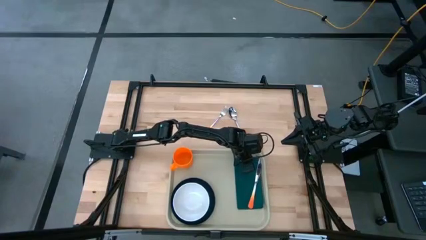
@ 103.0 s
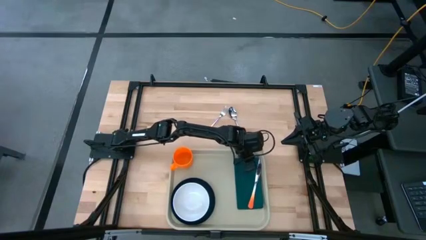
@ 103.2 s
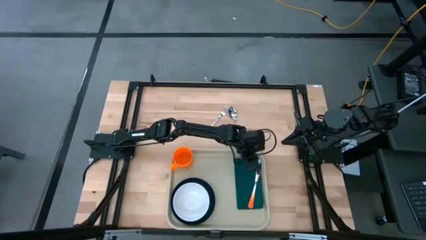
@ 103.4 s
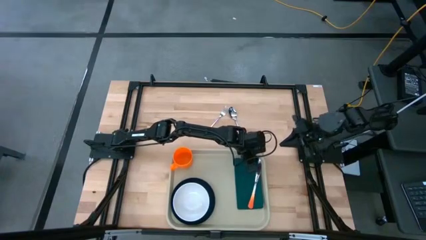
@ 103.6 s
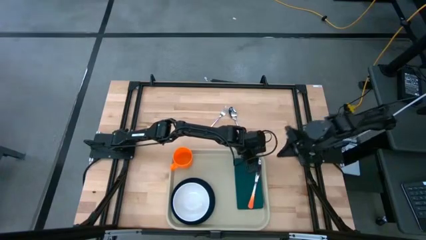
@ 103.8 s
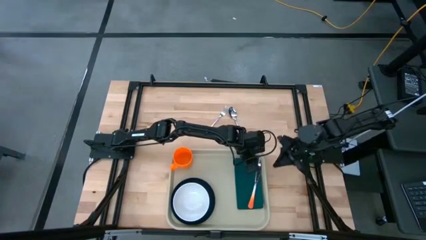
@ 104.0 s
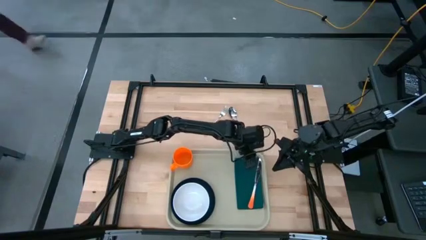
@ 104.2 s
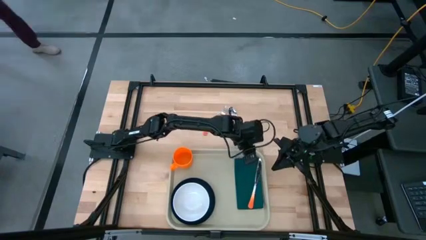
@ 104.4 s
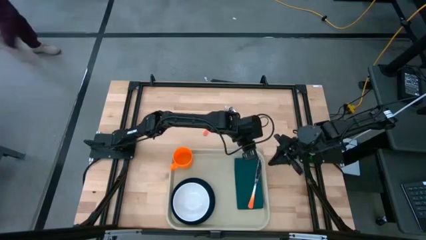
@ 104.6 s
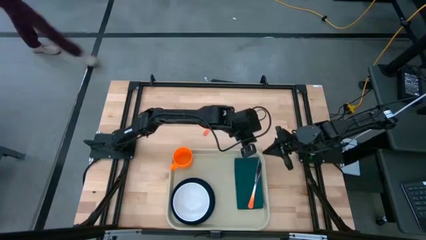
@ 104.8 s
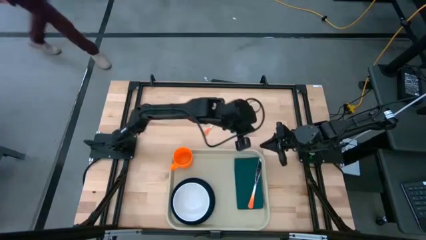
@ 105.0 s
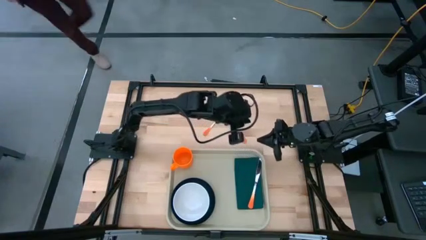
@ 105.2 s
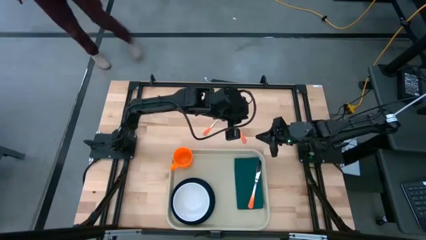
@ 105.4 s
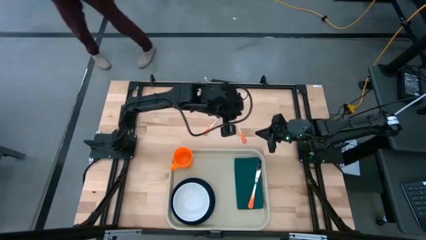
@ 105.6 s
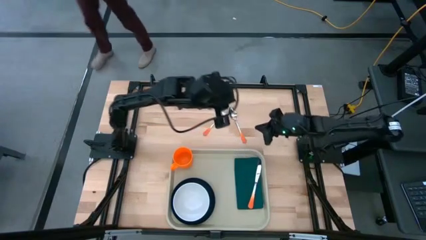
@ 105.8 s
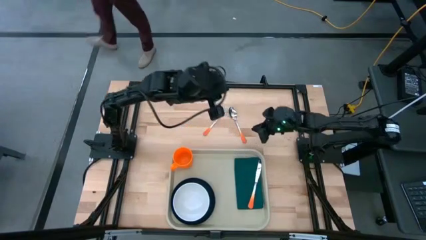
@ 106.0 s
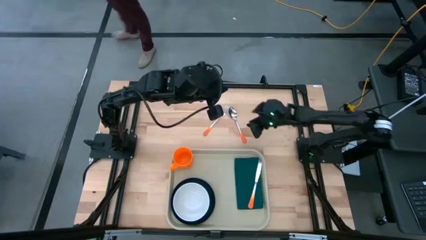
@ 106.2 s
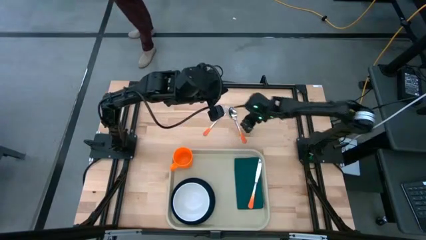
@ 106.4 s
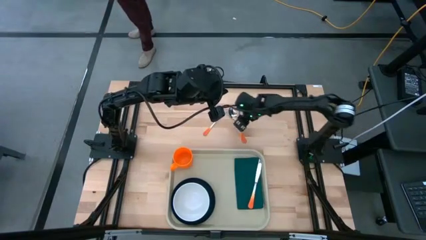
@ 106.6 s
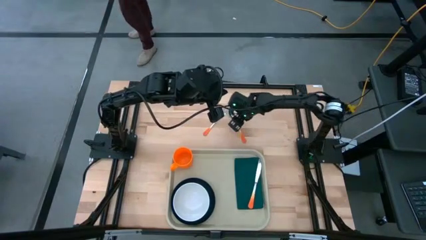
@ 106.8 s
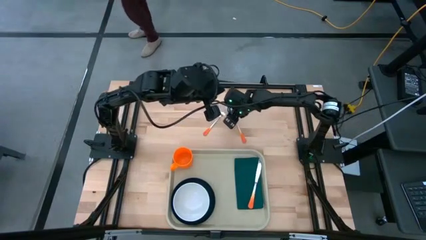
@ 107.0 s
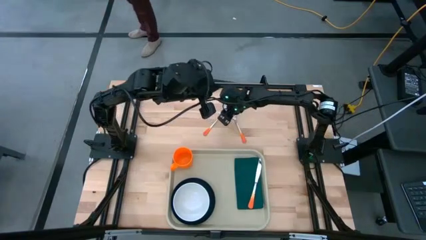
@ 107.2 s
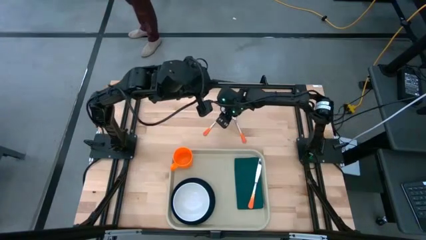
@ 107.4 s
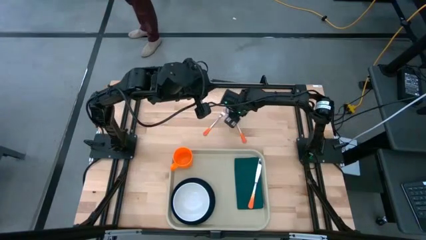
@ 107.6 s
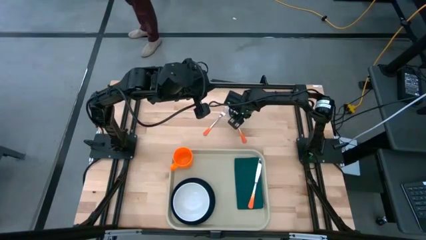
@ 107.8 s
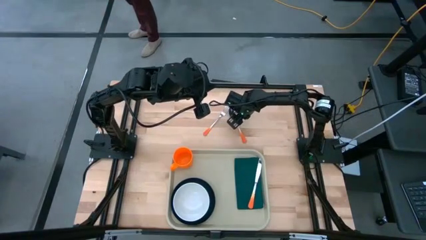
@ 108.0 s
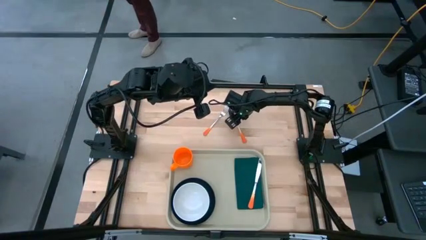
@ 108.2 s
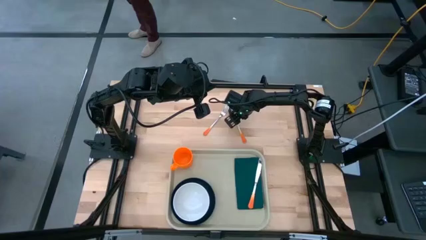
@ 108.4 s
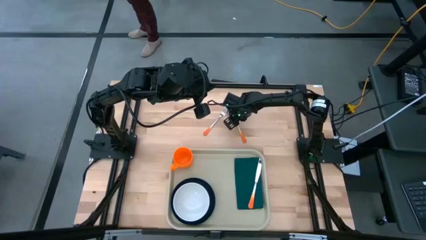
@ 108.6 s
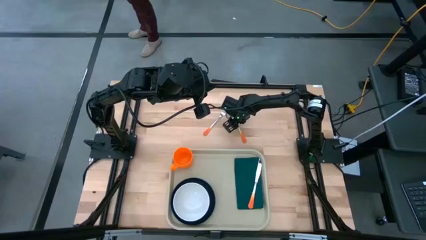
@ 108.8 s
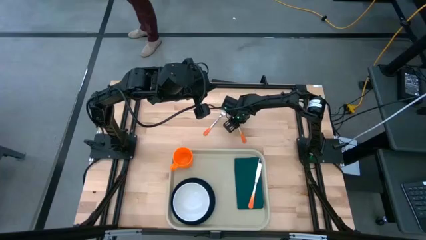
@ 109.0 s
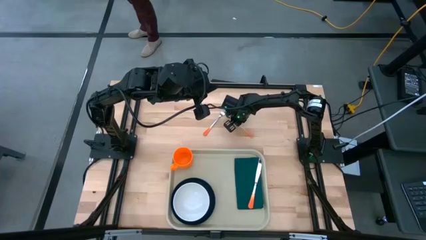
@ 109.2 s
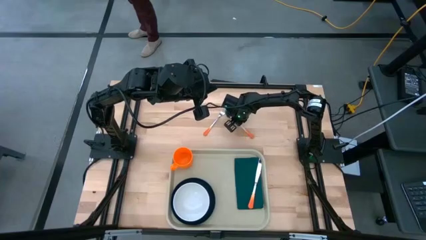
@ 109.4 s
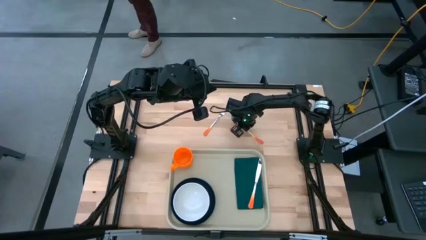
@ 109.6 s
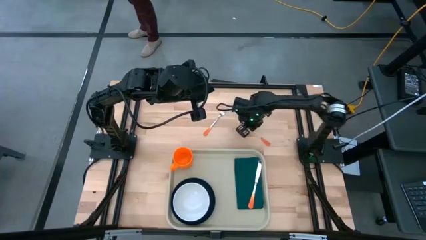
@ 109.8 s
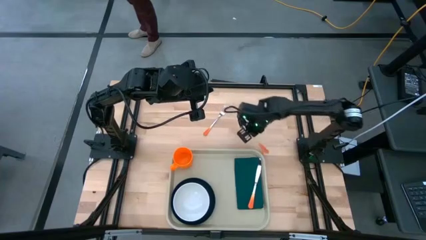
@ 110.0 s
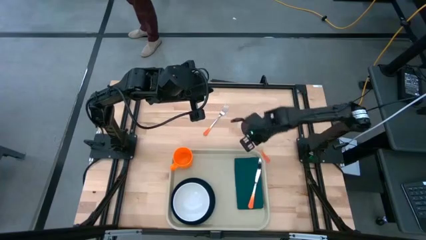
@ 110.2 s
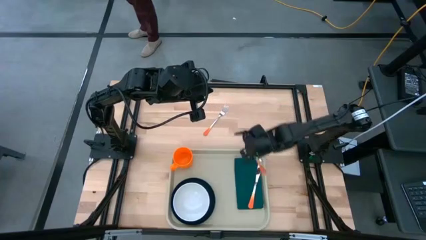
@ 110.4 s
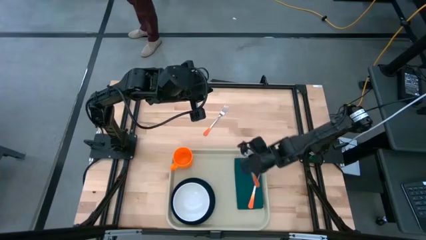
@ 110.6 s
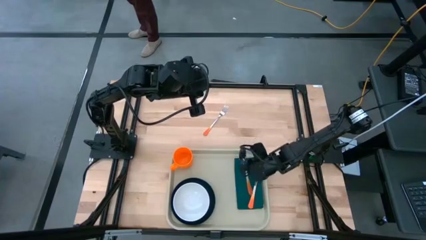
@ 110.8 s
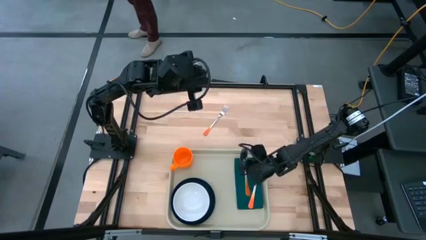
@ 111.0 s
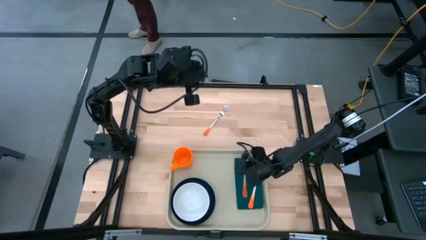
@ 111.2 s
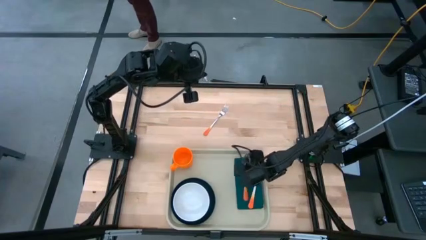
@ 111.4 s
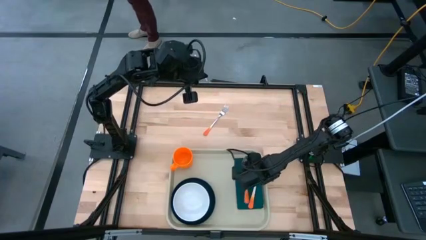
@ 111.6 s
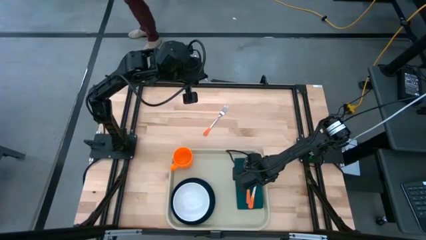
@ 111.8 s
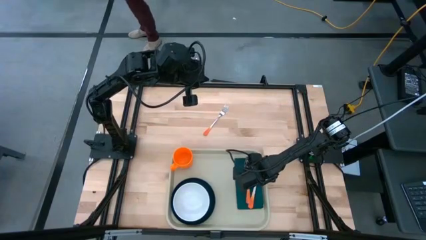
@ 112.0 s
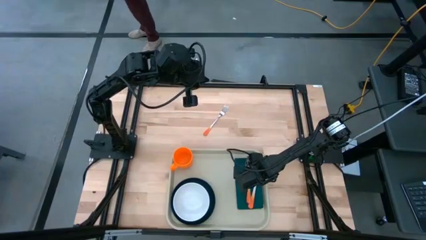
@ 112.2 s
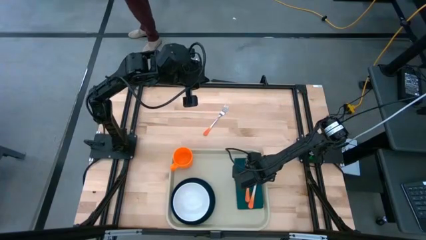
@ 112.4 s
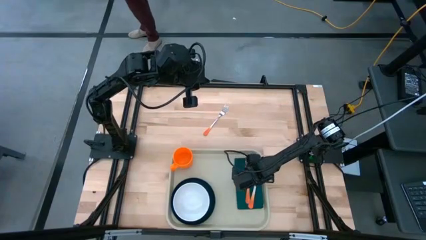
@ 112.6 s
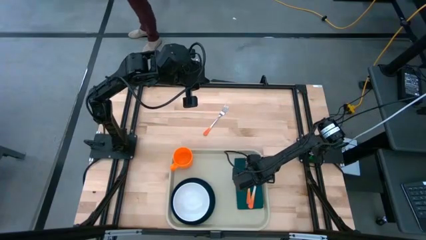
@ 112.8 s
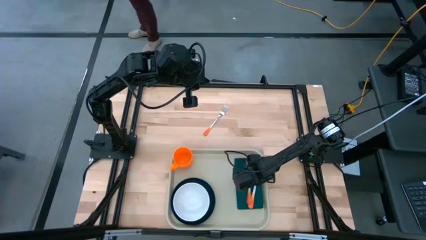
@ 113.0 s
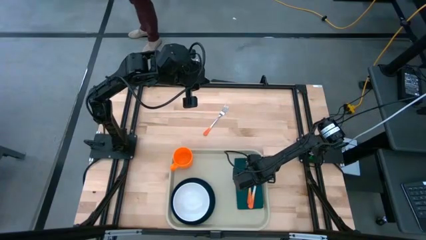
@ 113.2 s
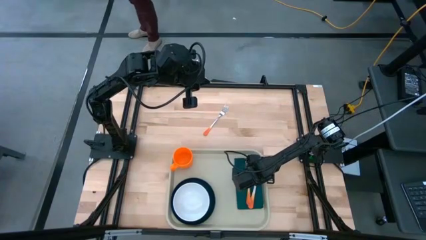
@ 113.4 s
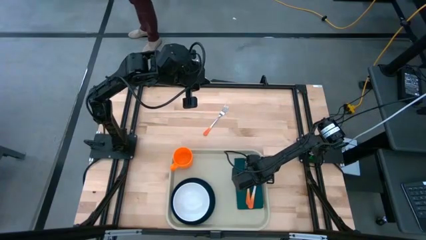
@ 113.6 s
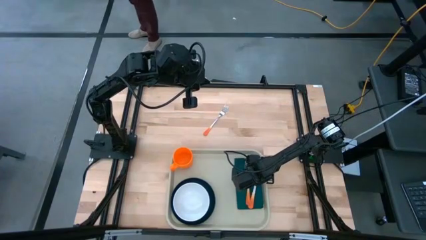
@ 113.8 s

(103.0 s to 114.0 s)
Task: Set up tray
Put the orange spoon on top of the green napkin to the left of the orange knife

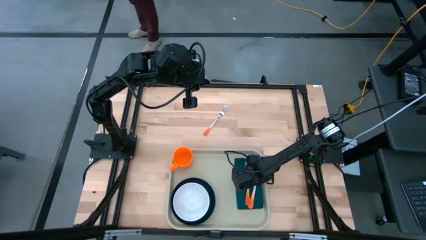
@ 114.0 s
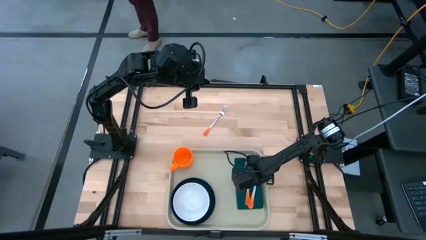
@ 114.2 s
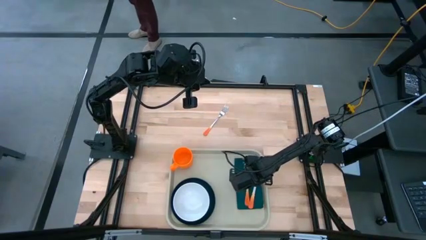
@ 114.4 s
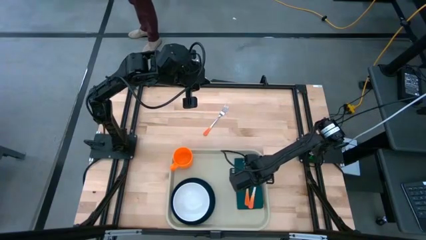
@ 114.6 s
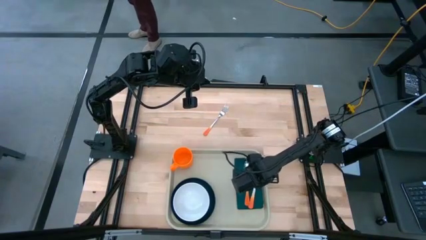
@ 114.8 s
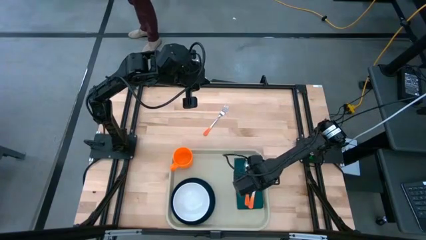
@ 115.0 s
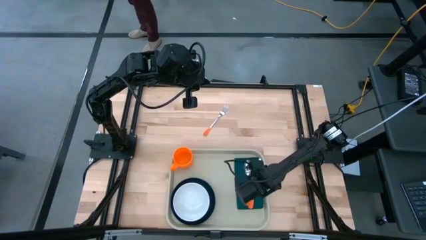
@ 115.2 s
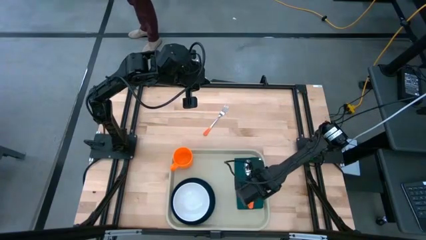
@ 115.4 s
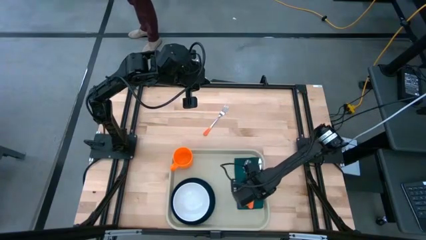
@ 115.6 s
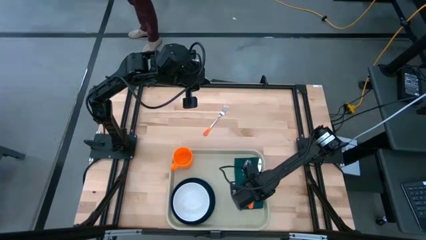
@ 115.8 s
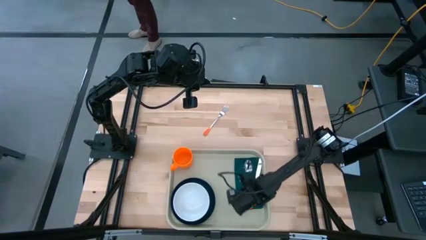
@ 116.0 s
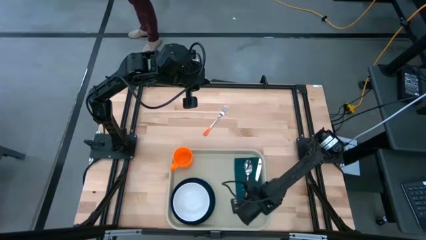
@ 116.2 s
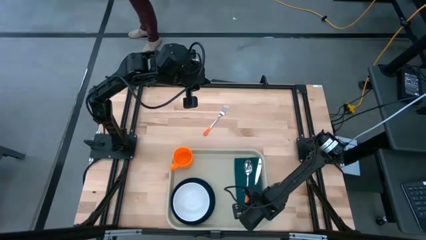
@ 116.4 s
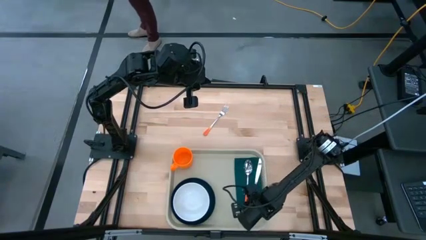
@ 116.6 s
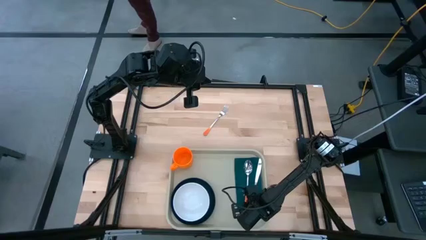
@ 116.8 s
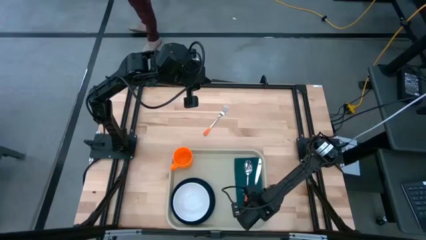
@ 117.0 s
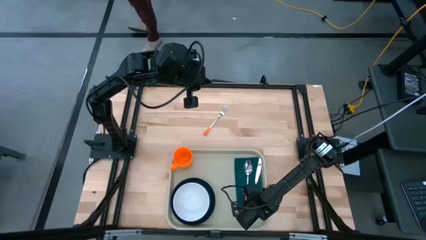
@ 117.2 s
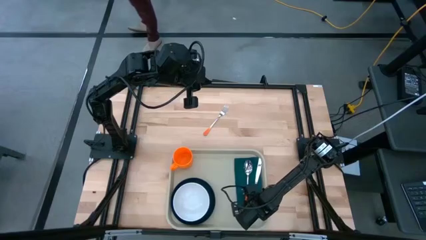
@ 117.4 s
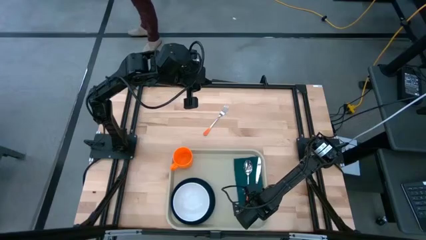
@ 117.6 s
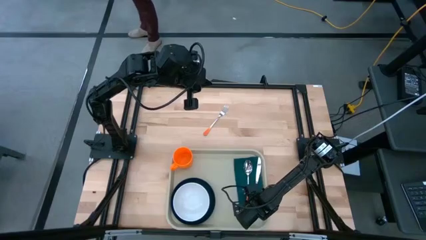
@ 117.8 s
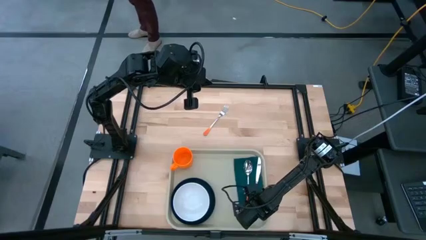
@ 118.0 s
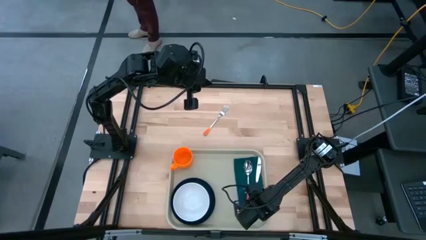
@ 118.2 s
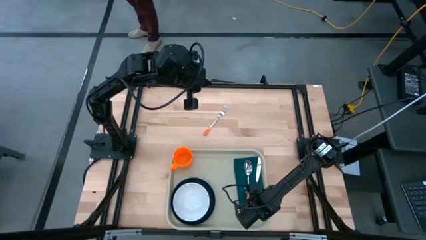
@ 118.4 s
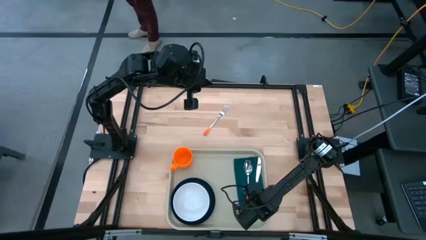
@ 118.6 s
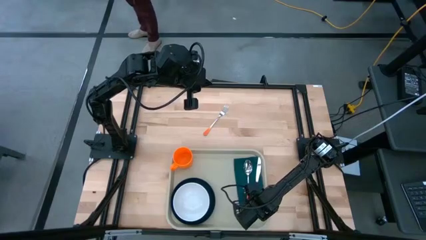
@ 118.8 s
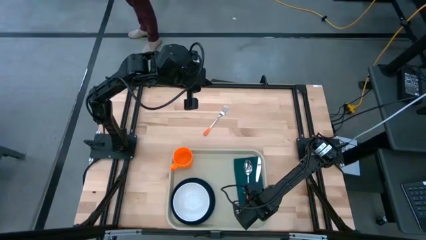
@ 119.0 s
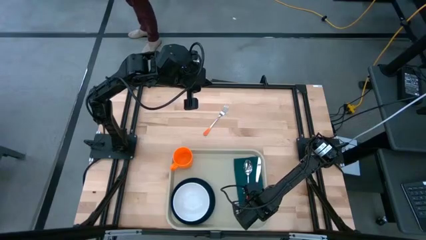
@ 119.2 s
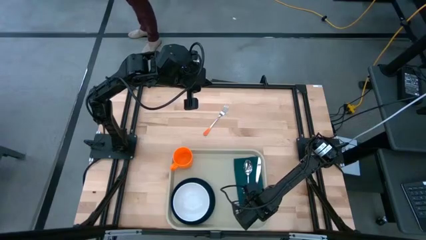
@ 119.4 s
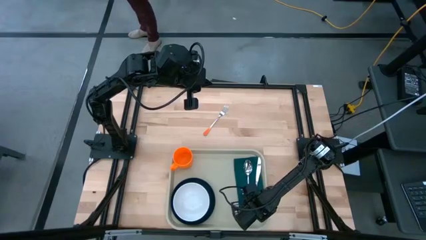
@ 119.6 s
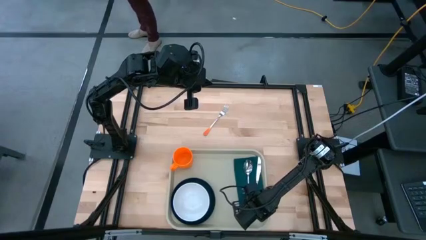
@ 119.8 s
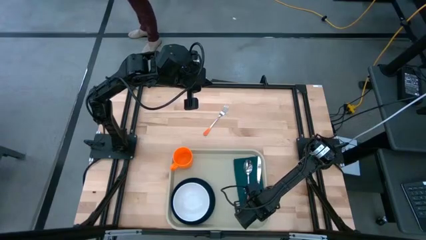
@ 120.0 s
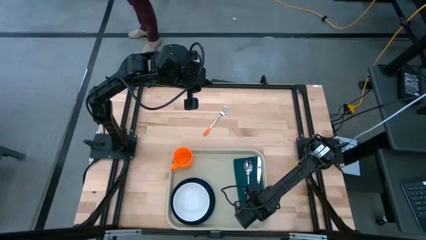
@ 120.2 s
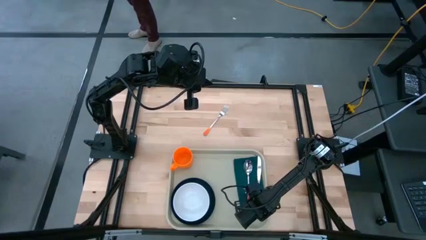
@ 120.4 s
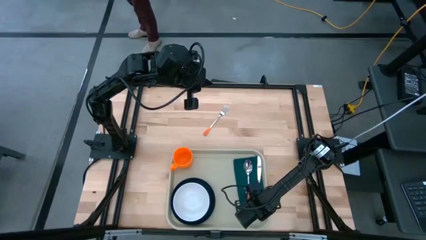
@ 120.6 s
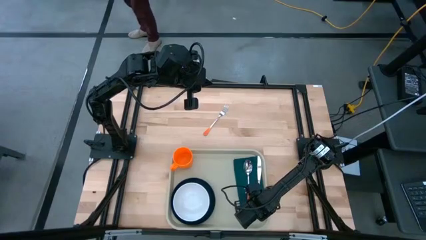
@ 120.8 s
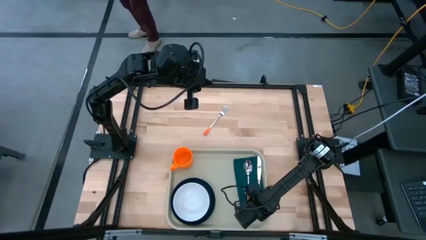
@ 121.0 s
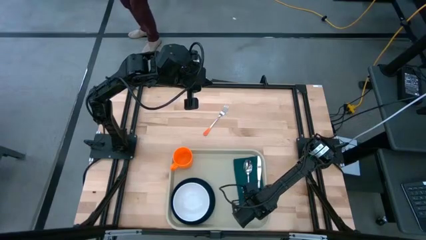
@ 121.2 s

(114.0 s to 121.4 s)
Adjust the silverware on the green napkin
